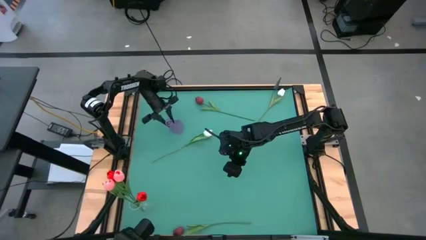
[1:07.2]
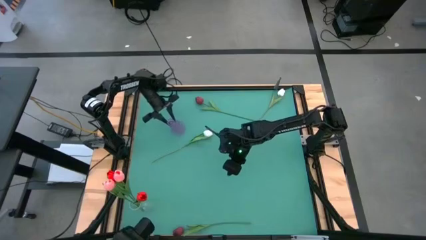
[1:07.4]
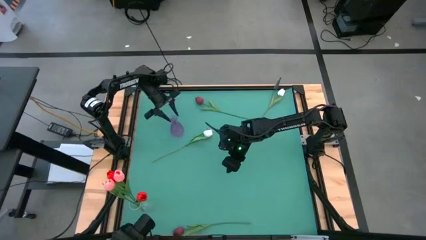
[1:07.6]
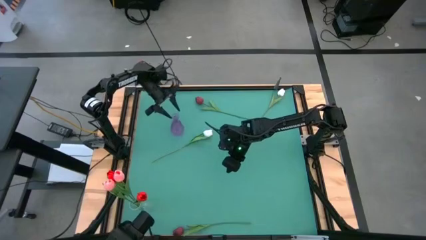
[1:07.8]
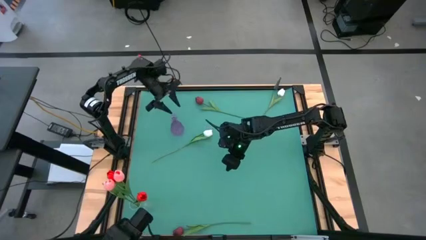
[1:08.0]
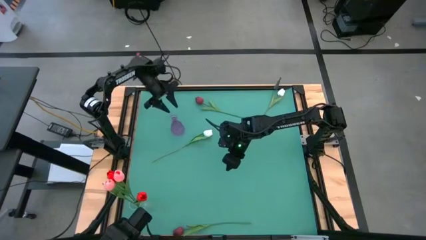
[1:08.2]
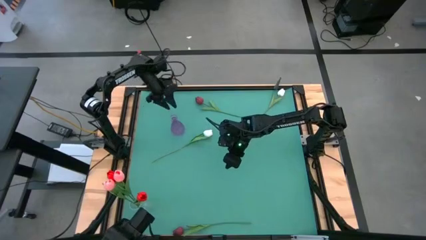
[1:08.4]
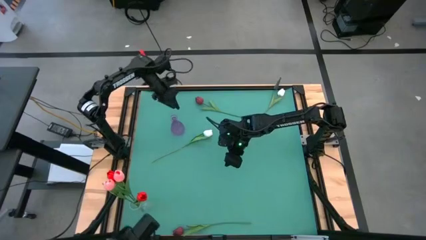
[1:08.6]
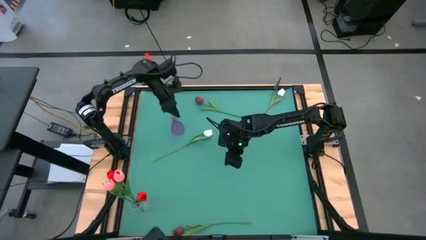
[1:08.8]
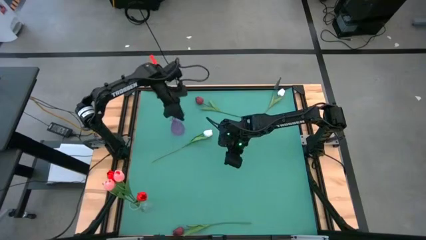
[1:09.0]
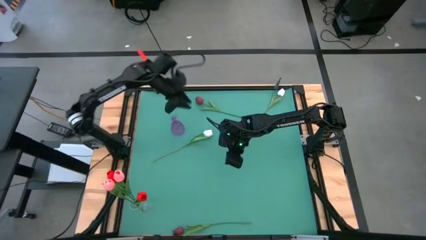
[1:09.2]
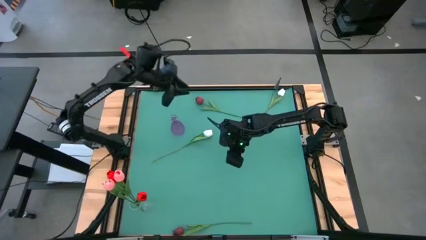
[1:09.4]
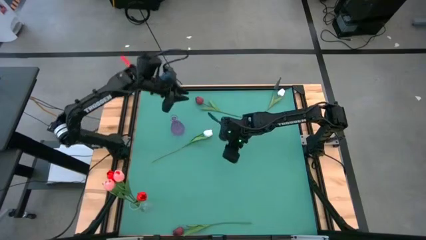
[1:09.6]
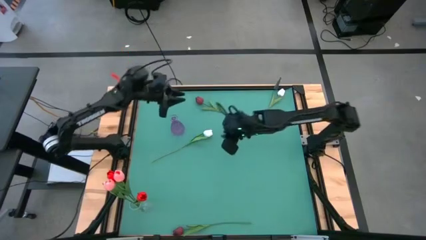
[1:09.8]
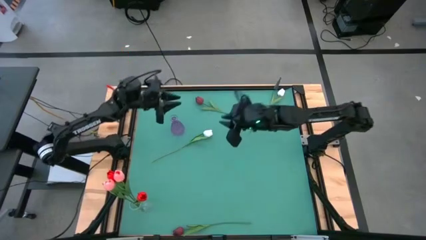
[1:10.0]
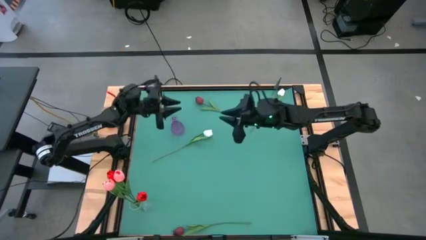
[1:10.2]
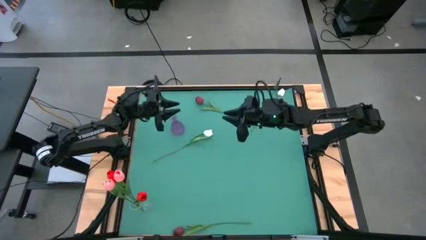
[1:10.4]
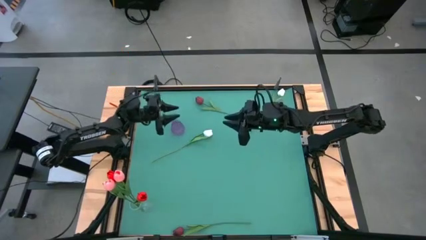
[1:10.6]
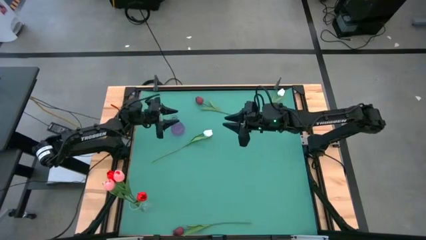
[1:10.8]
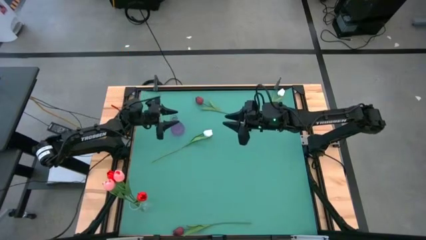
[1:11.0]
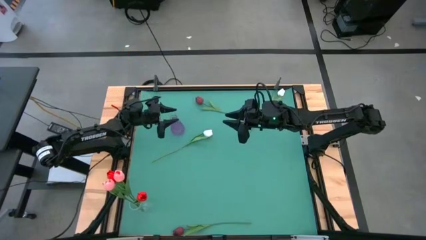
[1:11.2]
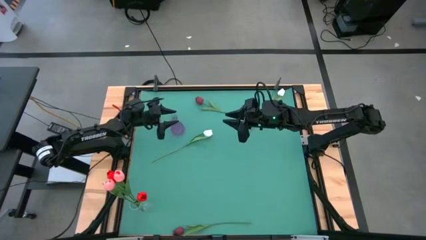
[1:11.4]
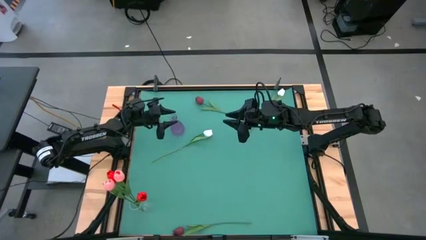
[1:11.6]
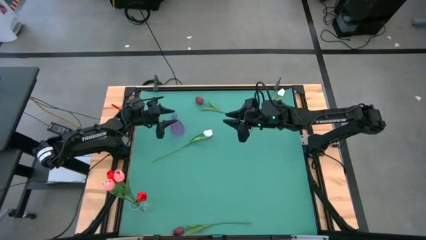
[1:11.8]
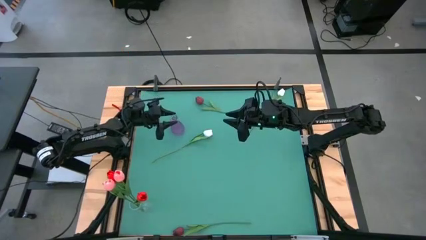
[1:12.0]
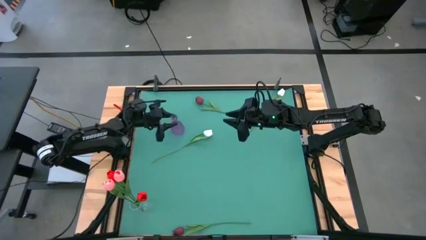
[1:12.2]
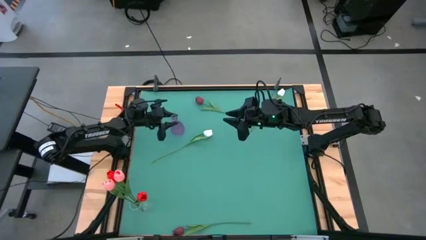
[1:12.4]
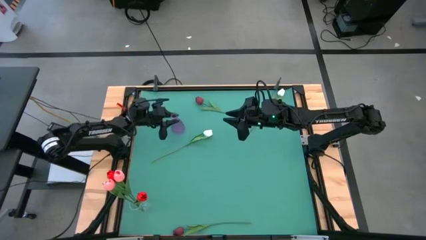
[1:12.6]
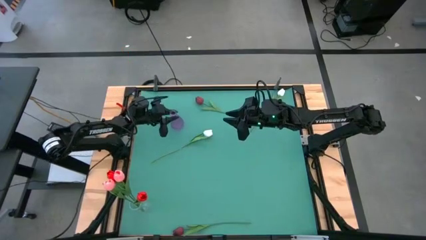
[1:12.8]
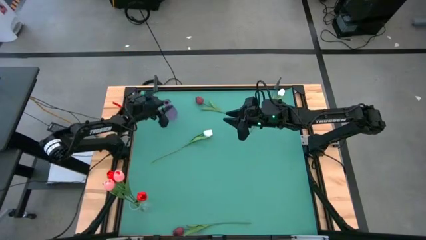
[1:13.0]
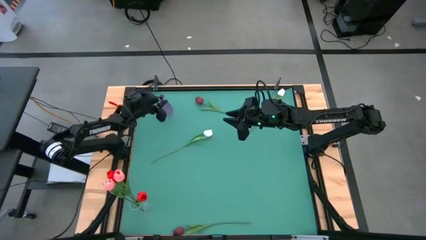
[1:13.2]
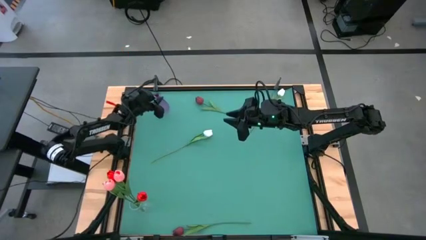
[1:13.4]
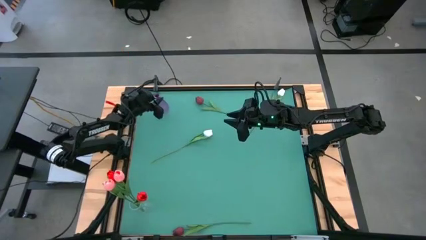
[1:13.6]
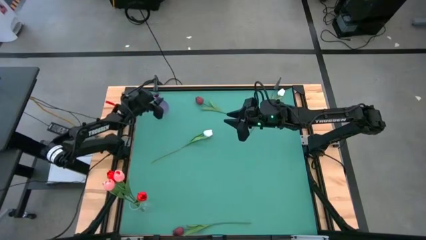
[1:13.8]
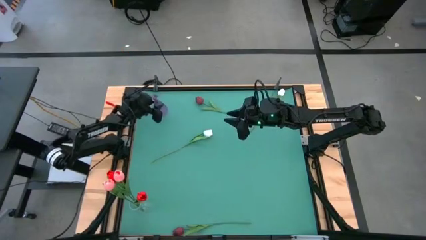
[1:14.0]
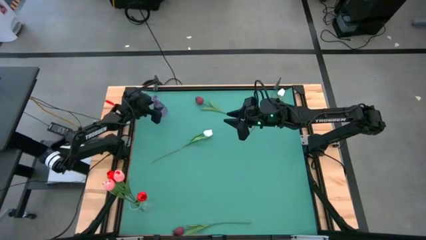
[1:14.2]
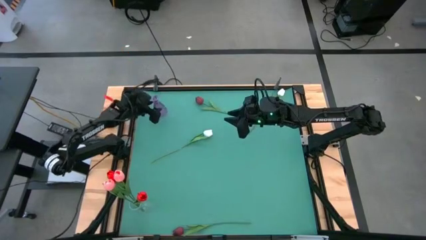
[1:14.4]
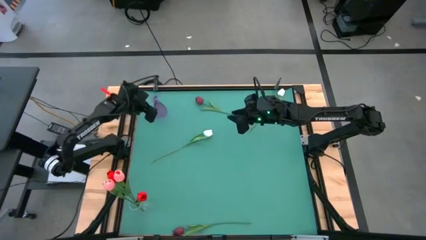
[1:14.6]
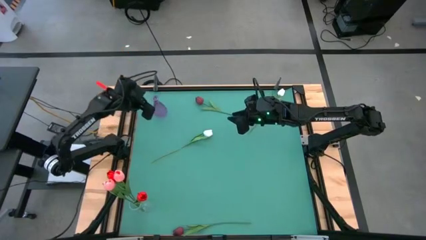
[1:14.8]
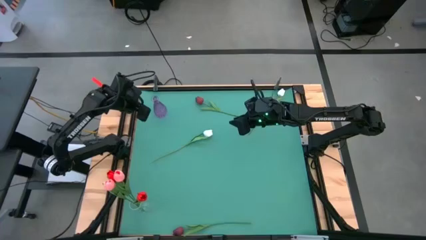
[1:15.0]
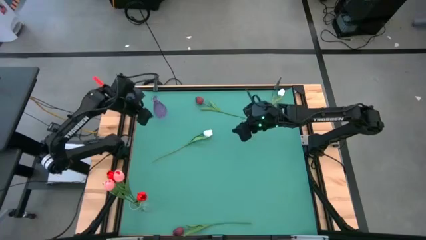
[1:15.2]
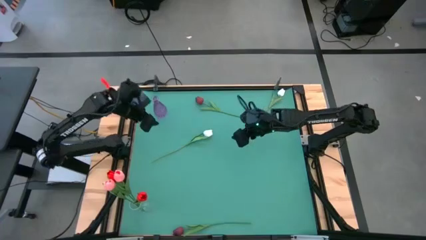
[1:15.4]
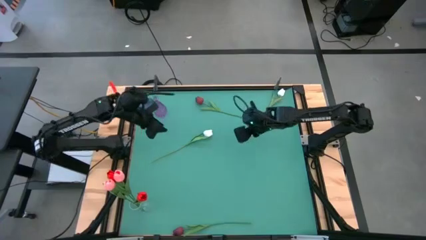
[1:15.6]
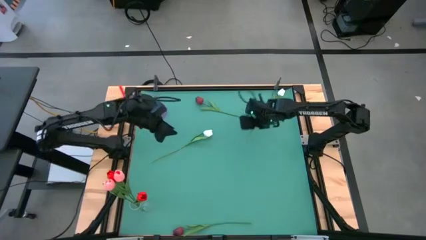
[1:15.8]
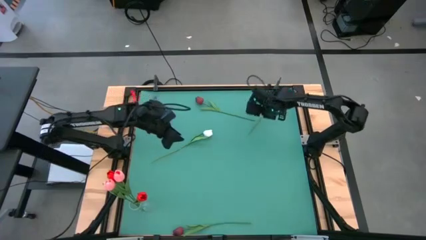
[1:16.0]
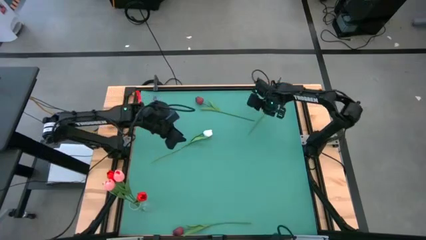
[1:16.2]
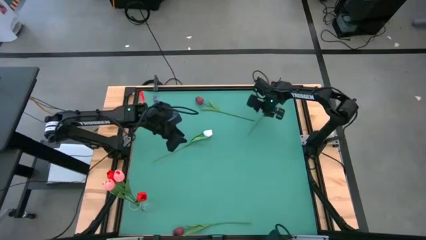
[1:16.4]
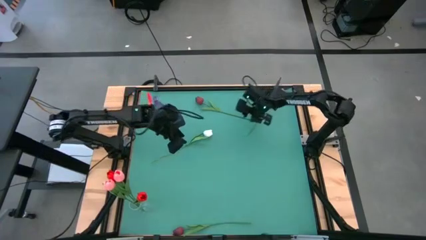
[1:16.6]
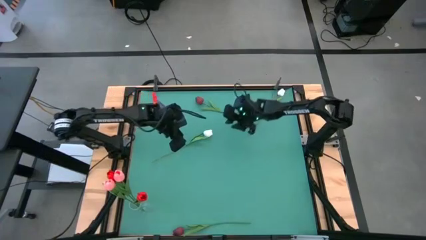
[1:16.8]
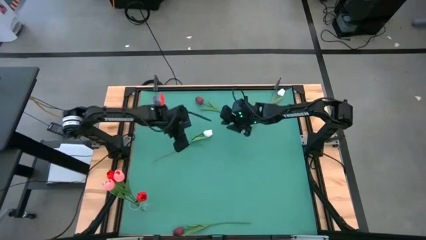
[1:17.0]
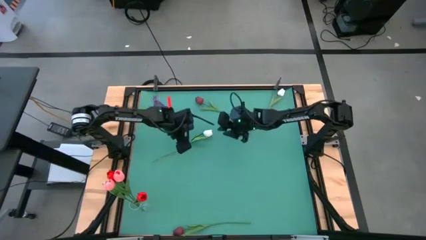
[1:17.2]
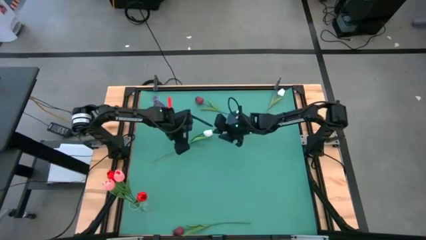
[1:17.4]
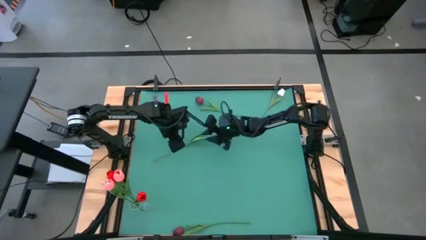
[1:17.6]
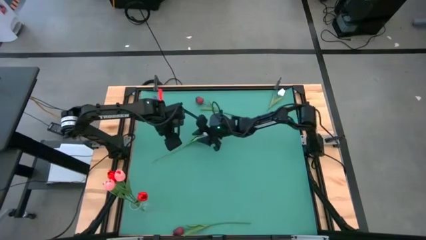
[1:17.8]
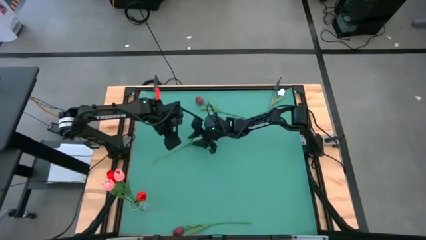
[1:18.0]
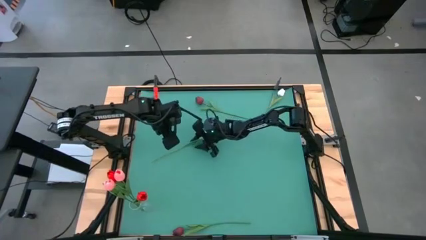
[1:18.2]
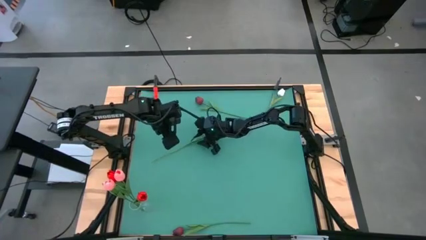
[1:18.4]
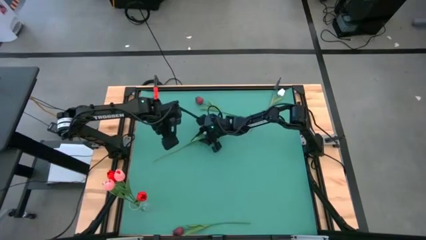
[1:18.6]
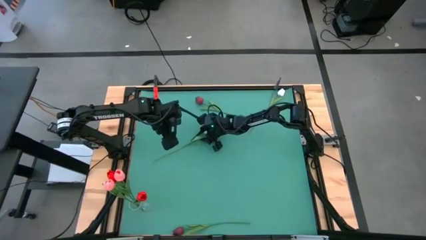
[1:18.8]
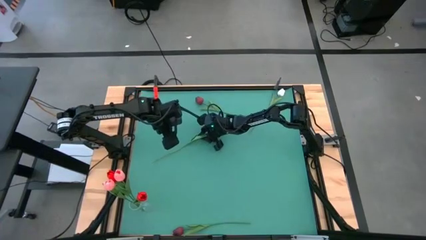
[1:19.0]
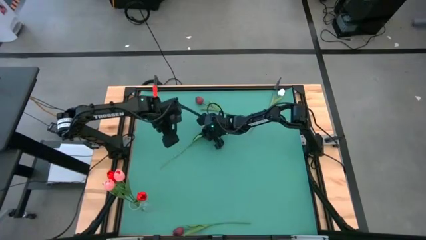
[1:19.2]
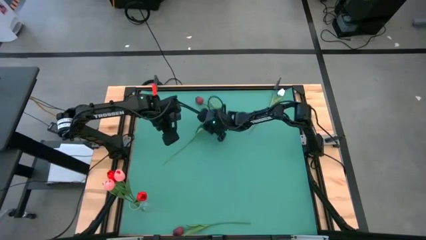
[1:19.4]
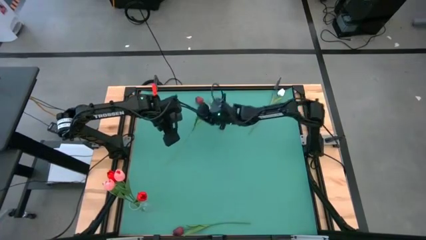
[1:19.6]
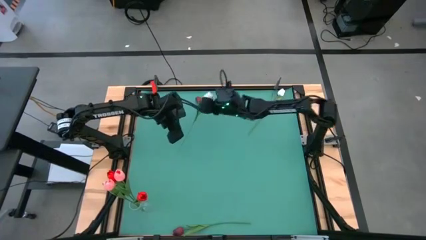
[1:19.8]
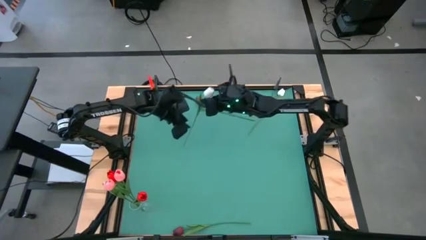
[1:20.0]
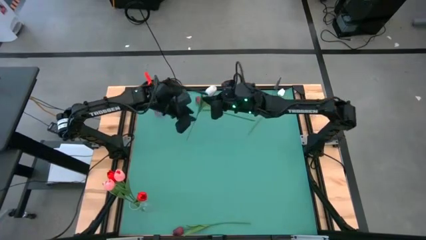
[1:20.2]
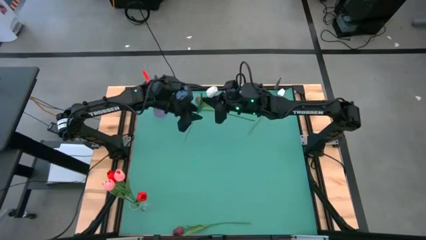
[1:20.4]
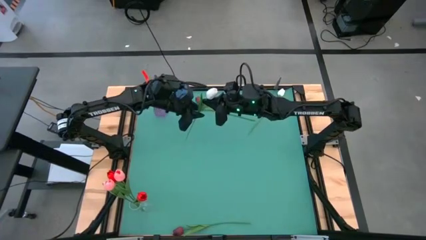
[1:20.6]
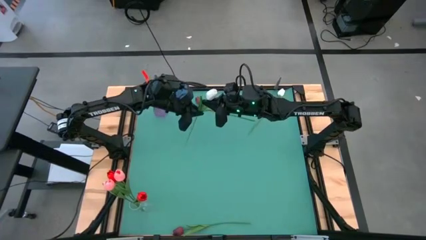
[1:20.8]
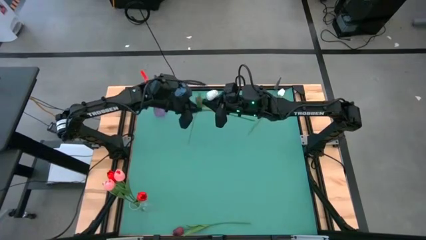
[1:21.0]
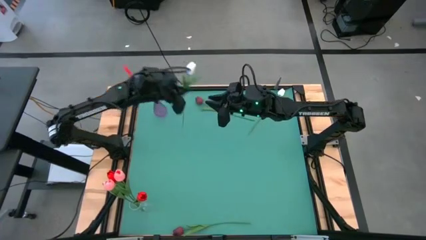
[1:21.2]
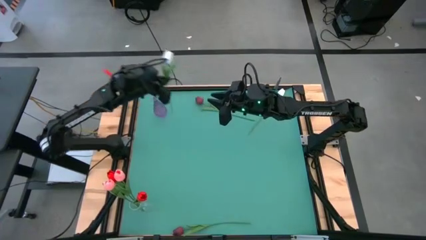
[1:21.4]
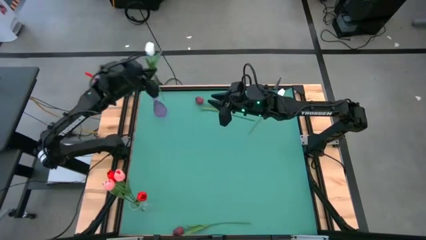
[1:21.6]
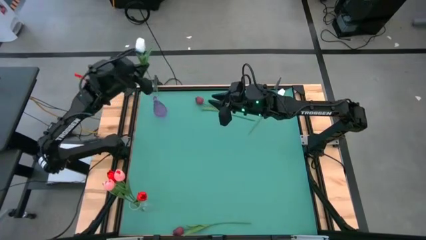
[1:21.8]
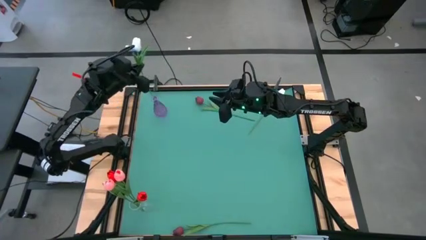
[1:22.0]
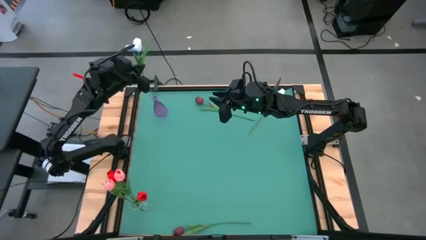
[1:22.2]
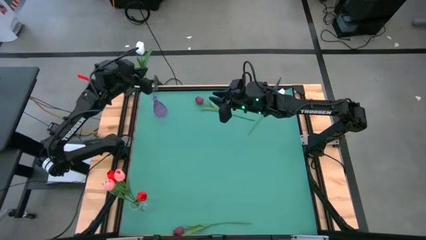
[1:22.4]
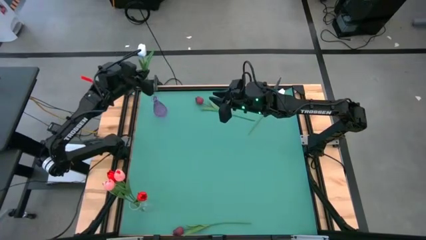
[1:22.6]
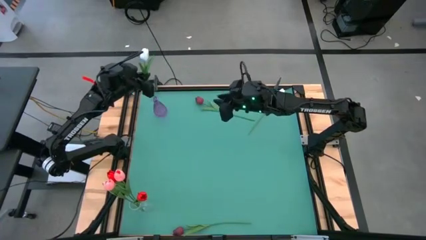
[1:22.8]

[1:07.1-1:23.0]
Task: Sort flowers into vase by color
Put the bottom white flower into the violet vase
